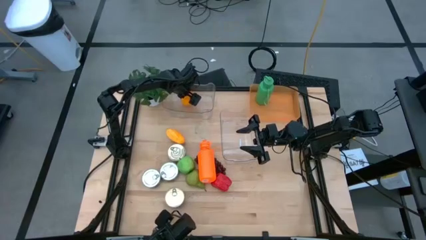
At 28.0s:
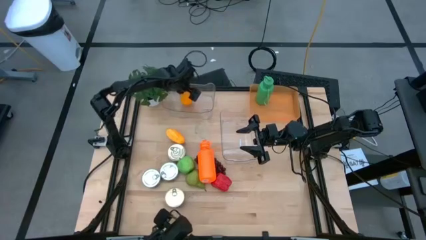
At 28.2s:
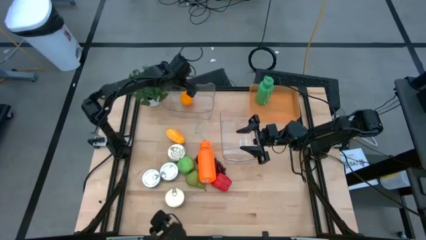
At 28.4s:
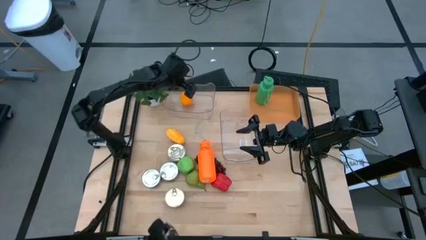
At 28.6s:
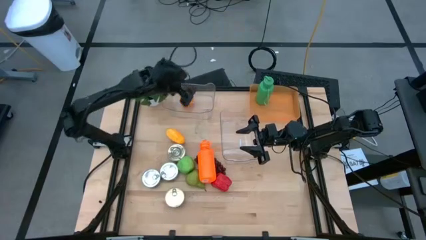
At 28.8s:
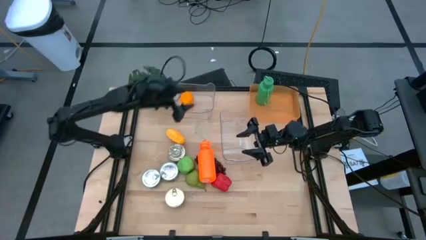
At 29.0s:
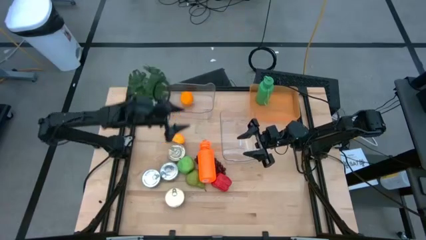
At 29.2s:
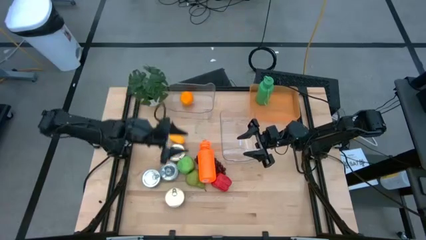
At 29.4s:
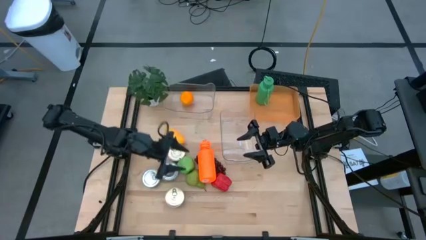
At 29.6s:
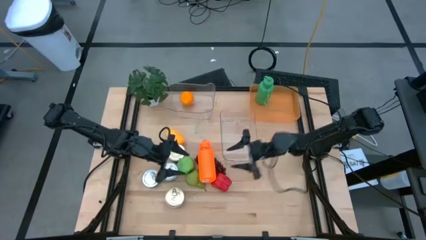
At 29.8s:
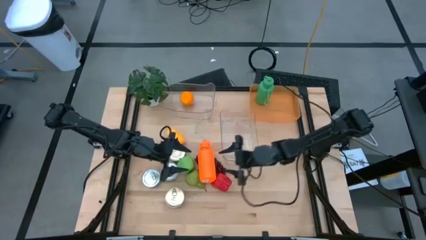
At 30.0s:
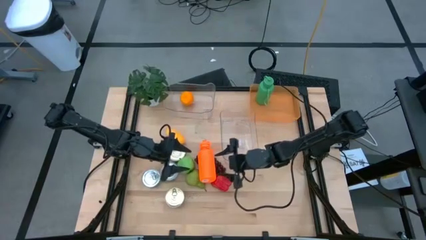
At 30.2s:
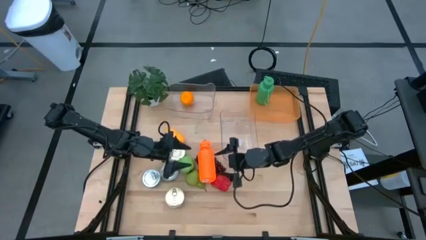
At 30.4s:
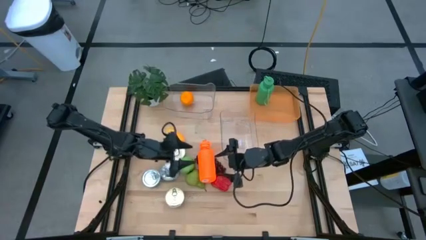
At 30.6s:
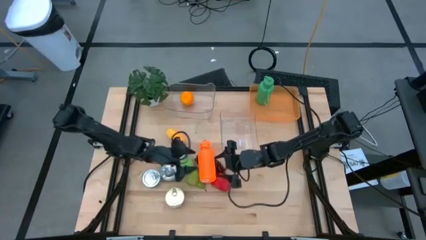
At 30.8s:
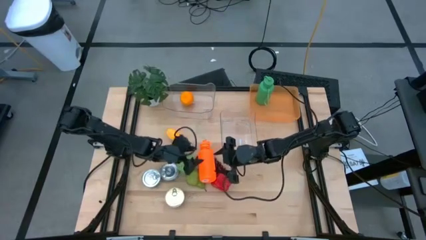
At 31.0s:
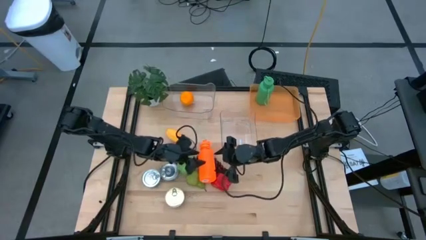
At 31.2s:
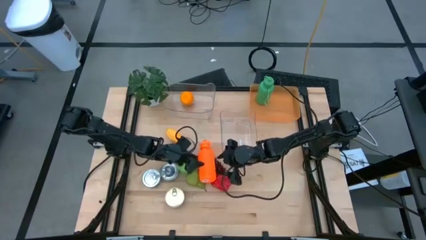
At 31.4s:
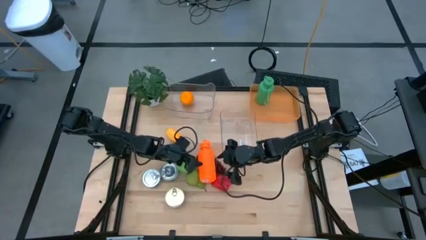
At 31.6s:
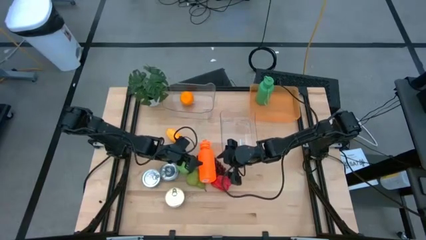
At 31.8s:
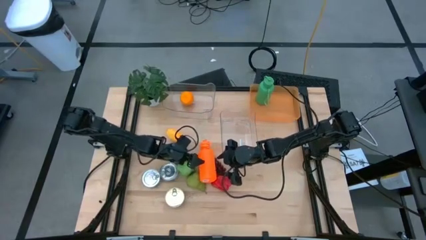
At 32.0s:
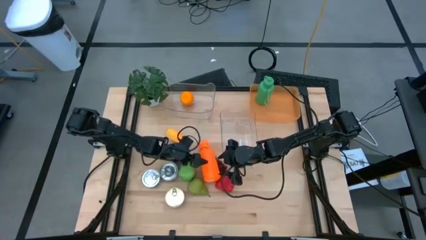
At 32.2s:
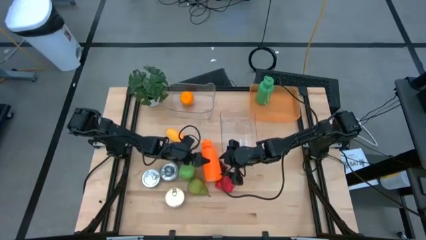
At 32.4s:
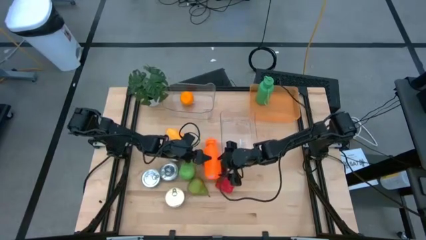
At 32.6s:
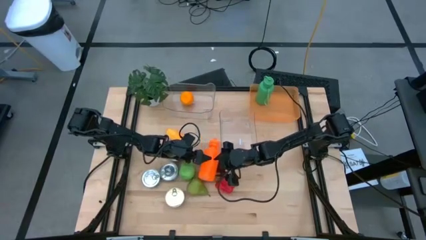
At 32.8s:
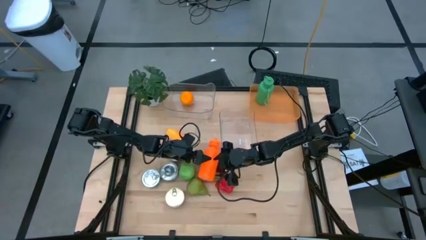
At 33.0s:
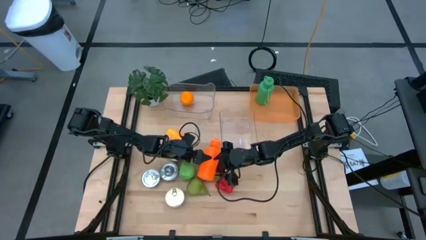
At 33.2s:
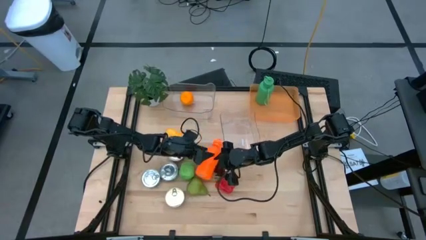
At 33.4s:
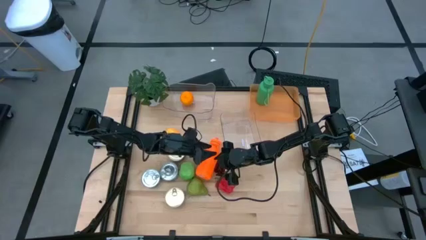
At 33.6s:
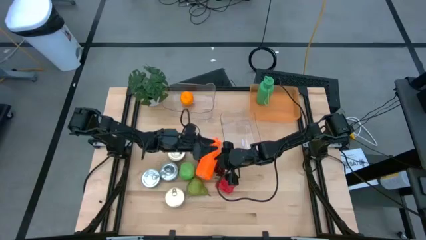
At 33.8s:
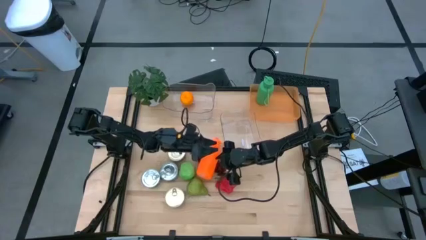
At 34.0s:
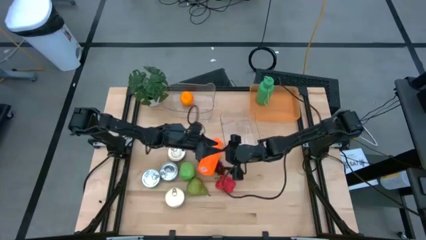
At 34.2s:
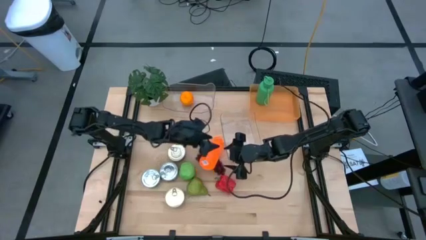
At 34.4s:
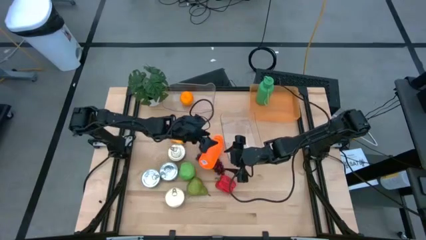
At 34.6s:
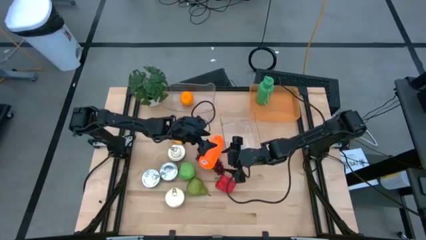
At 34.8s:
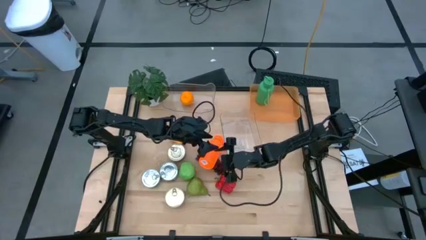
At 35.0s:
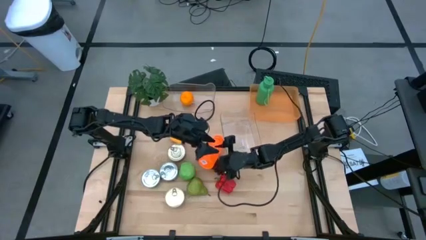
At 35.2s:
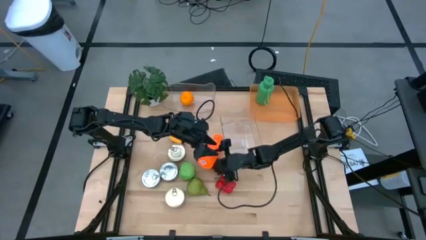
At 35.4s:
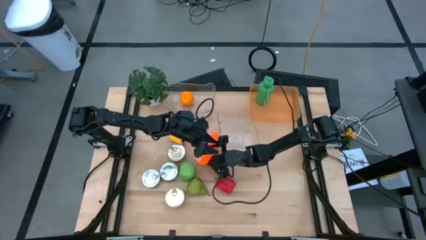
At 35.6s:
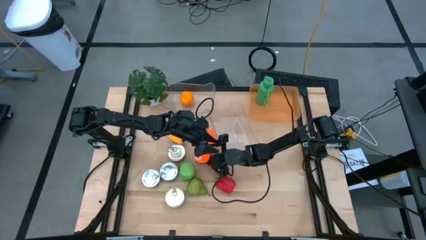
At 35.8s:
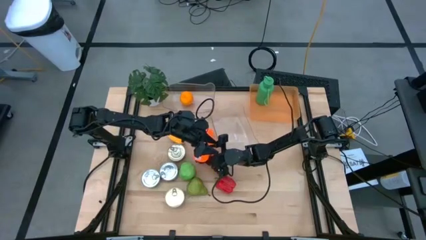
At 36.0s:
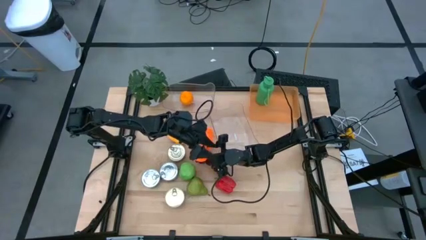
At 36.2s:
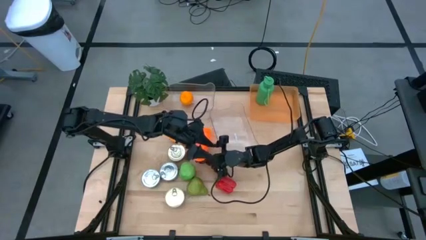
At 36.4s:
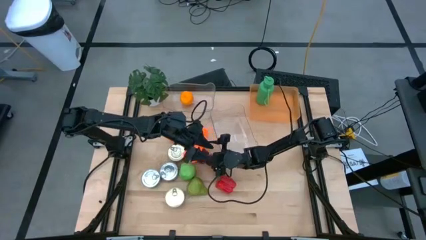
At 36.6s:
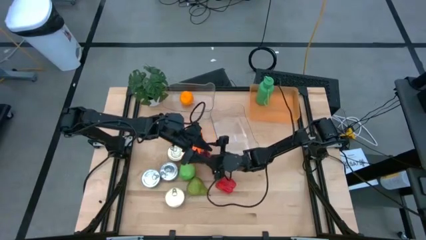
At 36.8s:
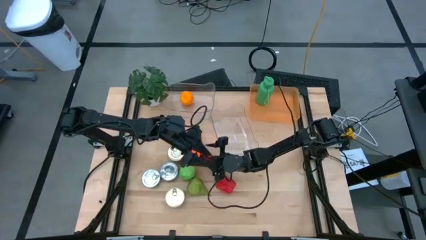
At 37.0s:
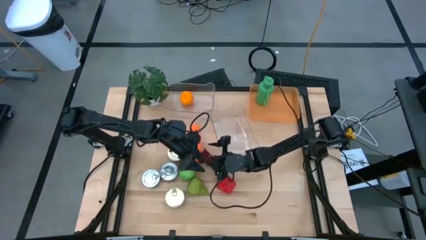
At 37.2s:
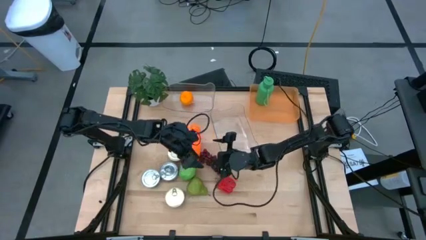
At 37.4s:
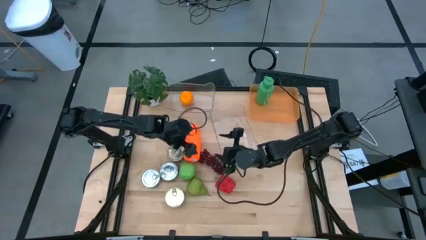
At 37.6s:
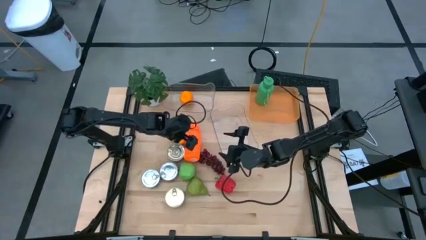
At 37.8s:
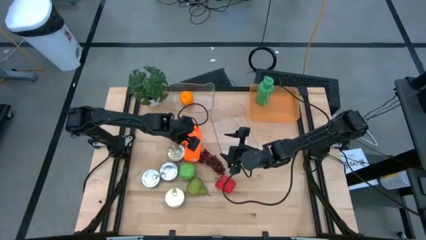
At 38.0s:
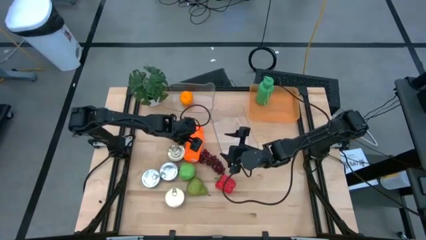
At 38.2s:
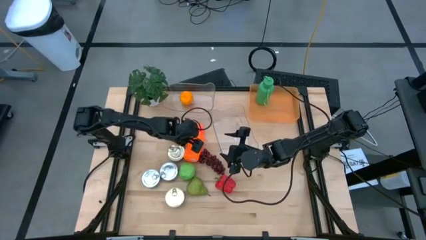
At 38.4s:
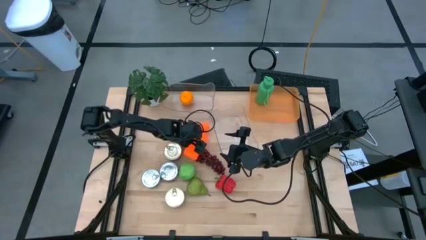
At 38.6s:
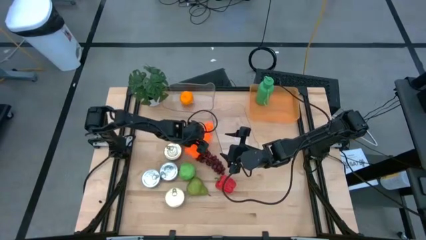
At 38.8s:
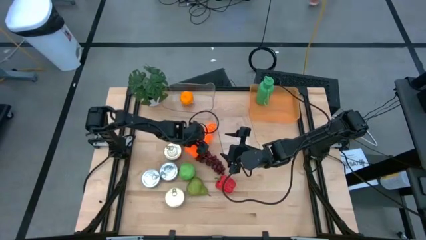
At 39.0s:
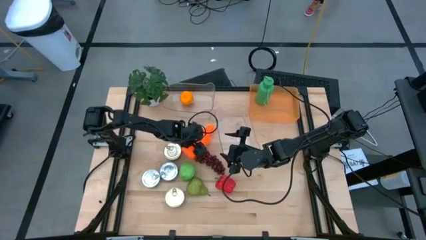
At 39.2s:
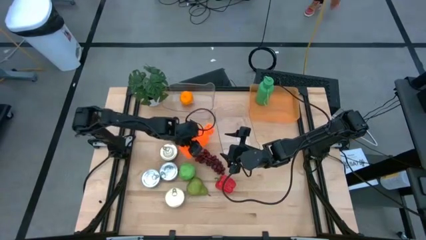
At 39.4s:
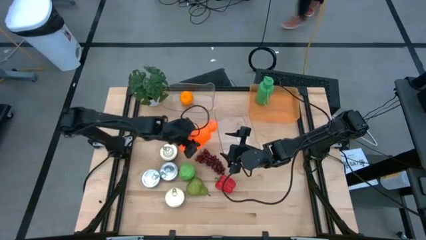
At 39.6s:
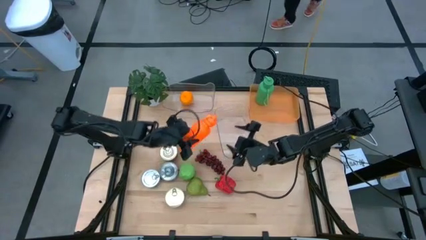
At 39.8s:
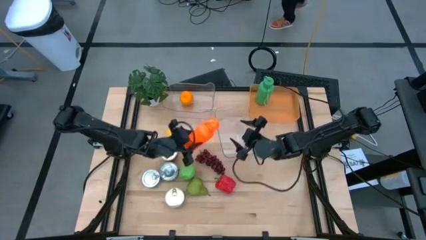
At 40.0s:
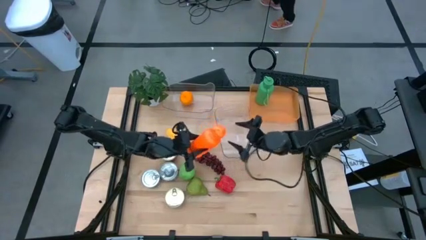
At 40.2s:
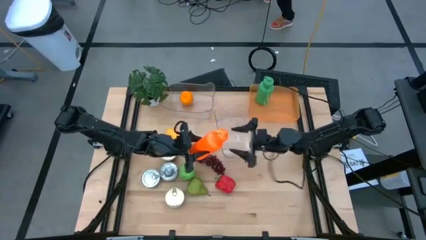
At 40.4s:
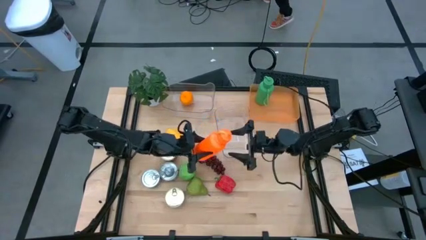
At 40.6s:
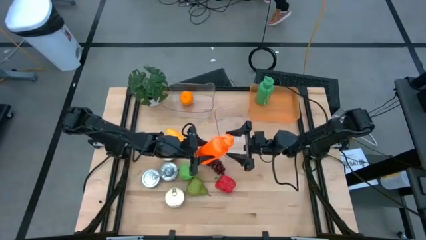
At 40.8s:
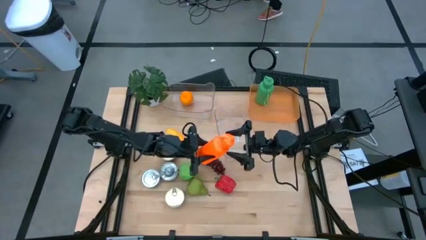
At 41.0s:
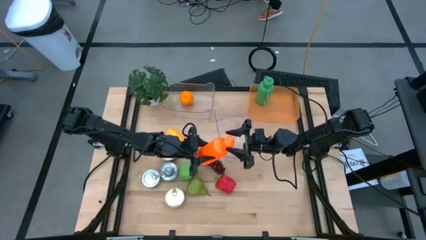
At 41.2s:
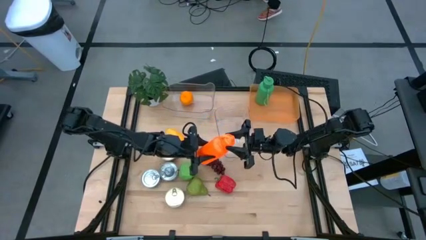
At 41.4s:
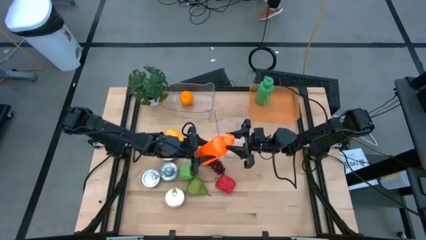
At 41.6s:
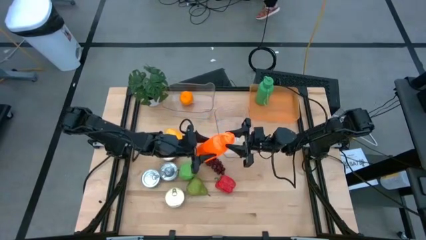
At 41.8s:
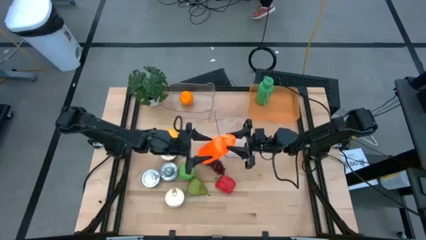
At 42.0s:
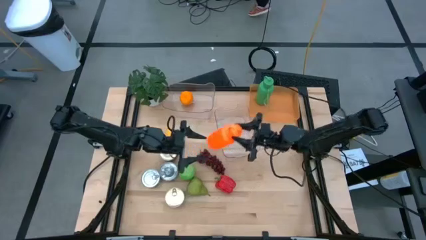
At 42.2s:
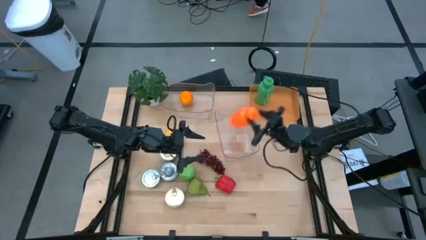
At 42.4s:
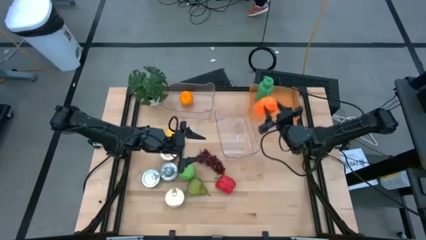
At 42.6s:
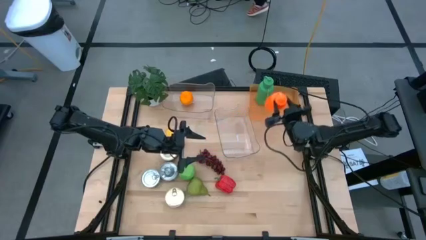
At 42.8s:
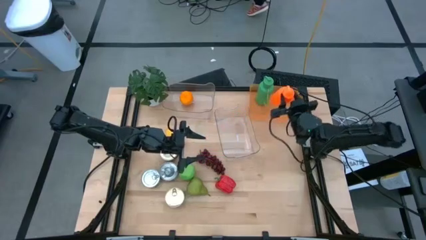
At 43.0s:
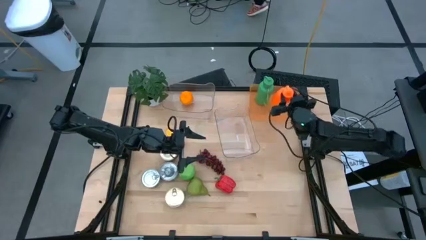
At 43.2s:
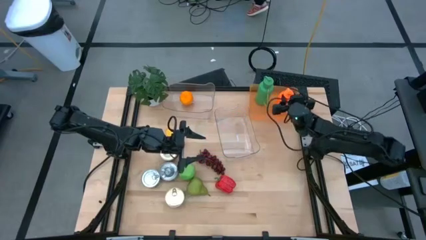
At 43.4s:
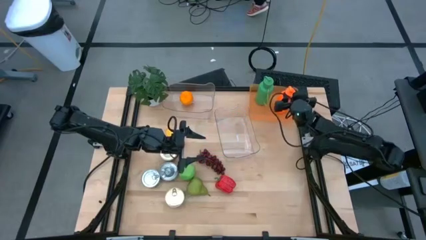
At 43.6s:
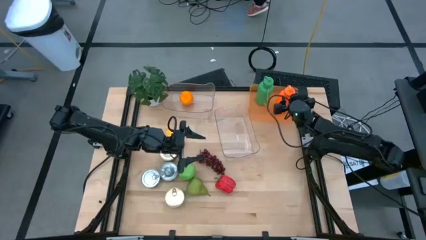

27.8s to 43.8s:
Task: Pick & Place Food Item
Put the orange water bottle into the orange bin
